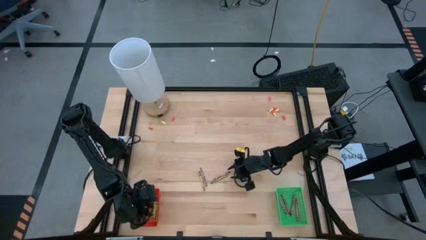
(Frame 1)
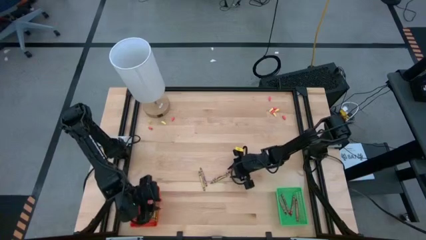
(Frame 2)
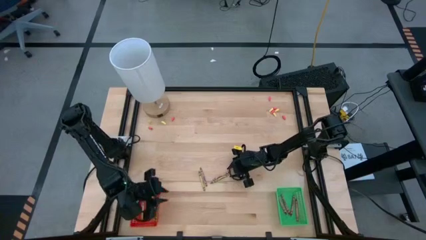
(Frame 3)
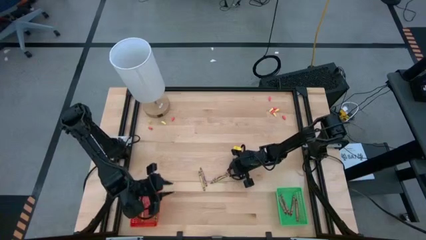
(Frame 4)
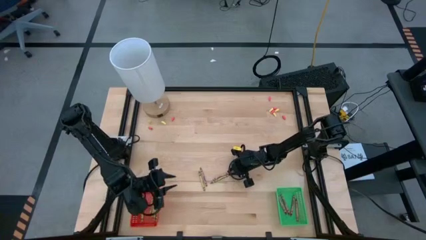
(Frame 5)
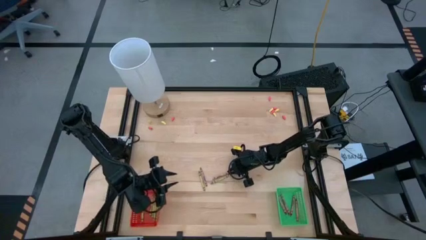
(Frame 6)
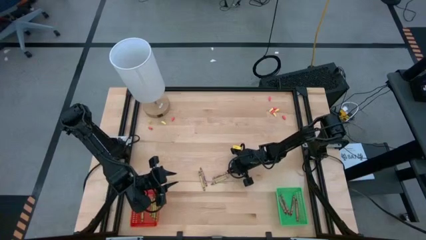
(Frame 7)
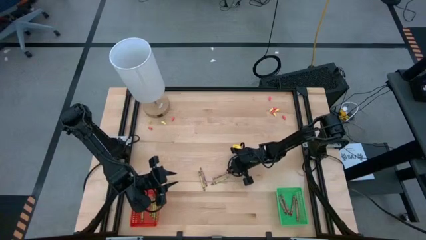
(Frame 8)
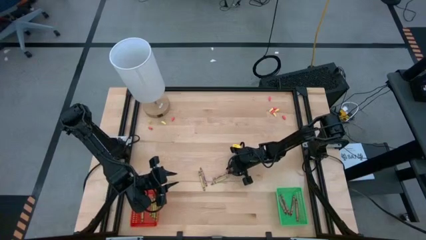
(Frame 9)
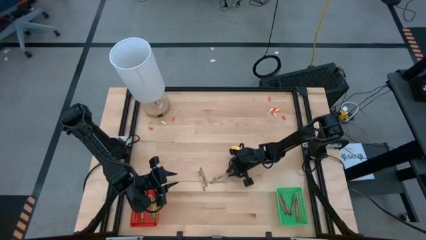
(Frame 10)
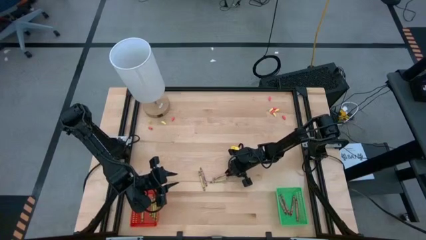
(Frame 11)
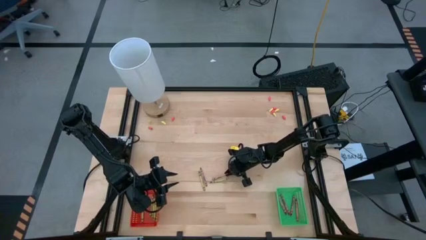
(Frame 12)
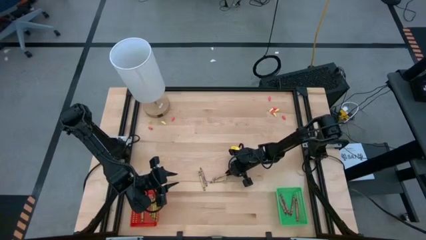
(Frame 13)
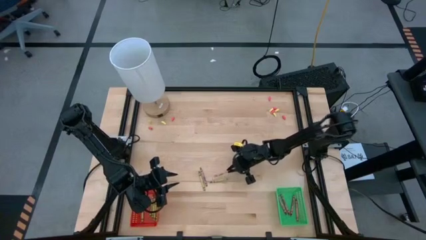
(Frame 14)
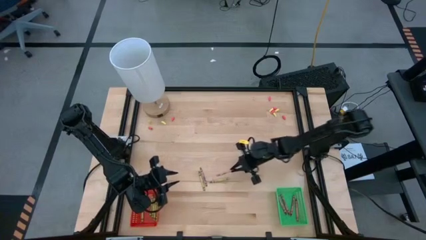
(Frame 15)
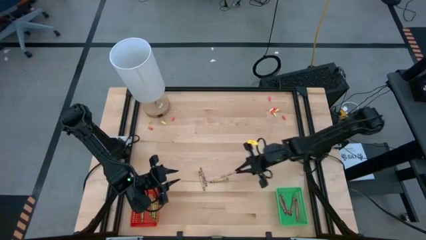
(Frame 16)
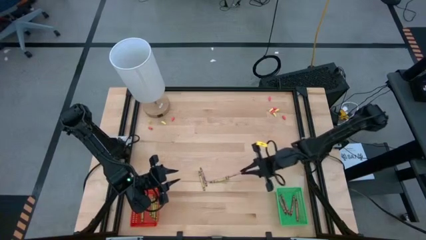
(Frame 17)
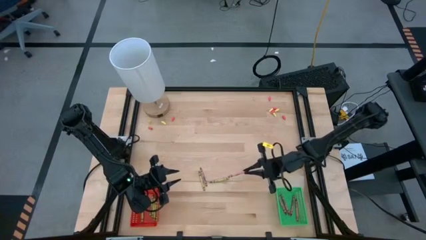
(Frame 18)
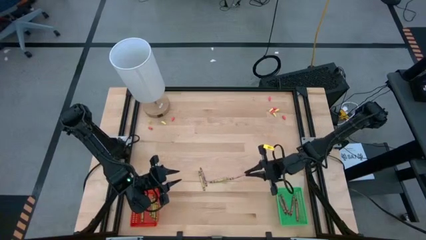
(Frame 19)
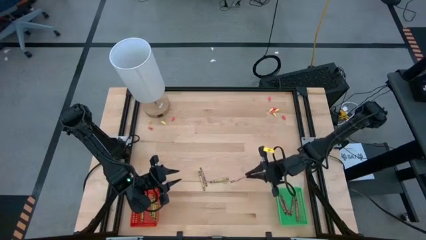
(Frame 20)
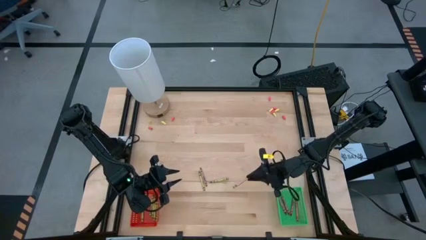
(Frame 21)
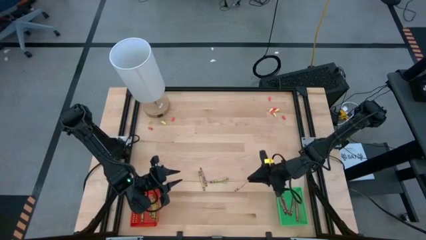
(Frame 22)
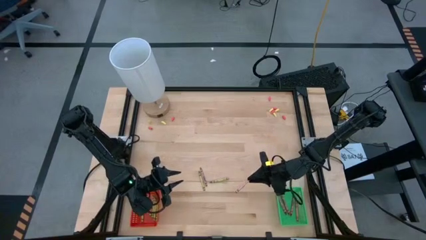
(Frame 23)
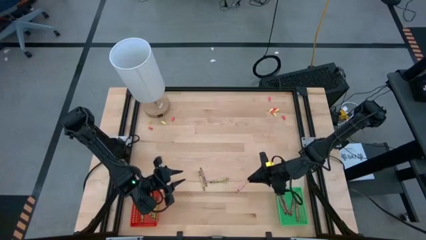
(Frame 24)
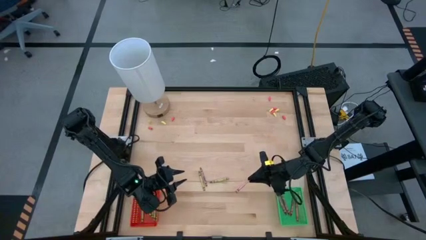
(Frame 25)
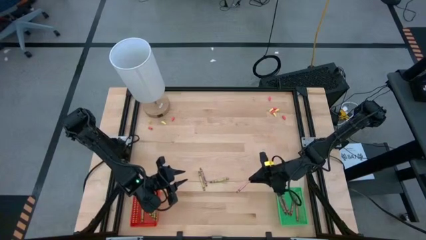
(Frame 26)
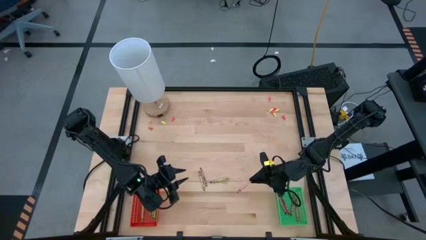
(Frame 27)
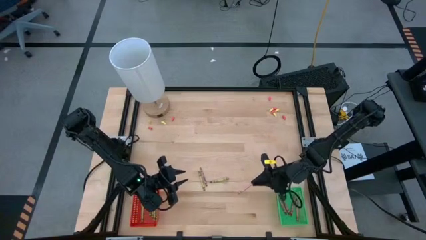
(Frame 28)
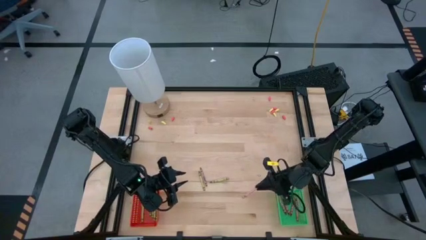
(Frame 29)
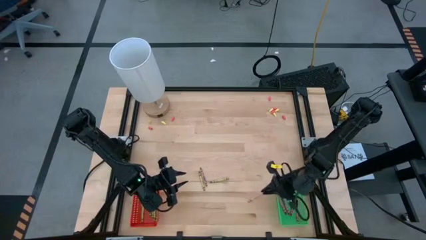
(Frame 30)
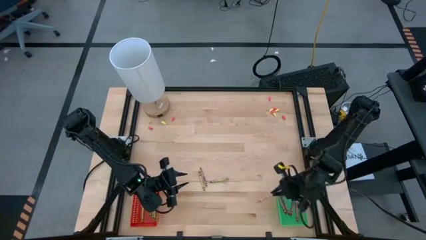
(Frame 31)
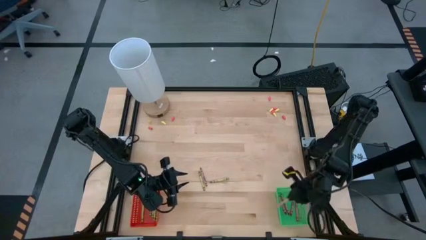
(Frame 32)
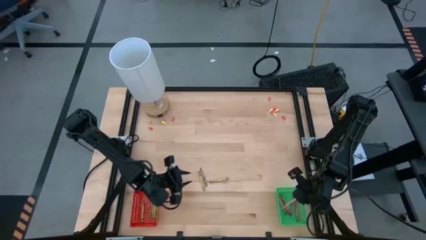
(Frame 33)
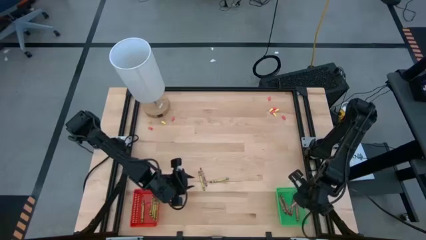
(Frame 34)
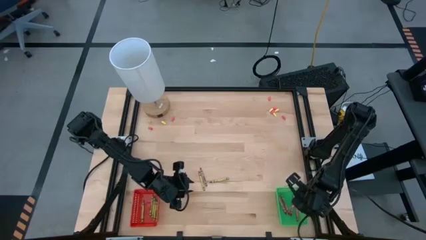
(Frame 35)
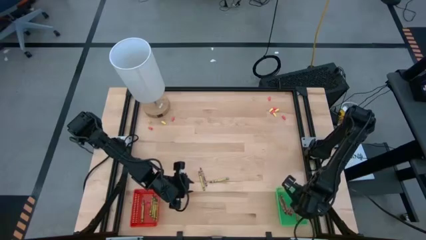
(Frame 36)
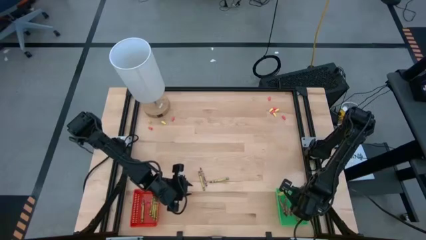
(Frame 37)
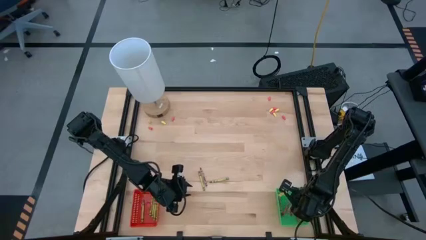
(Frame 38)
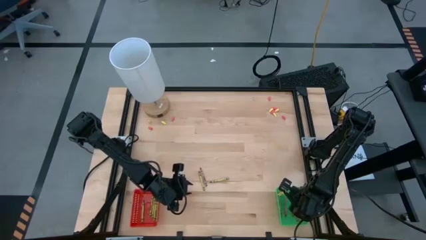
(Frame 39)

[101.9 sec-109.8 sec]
Task: Sort crayons
Put the red crayon into the green bin

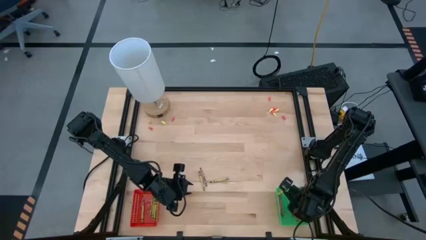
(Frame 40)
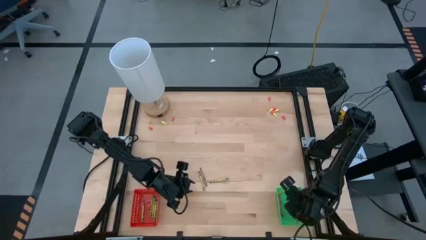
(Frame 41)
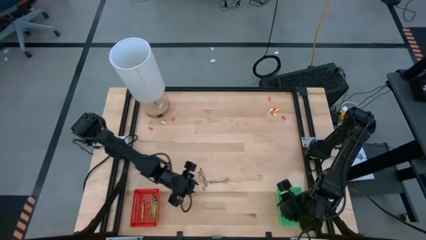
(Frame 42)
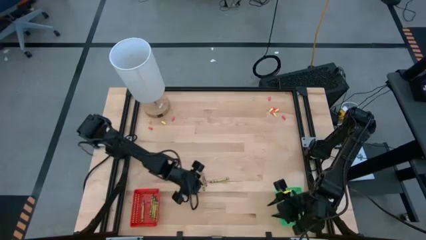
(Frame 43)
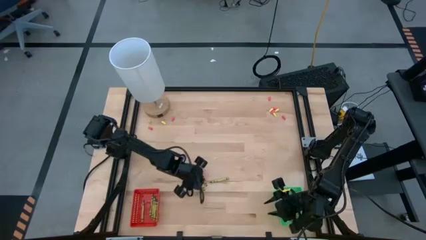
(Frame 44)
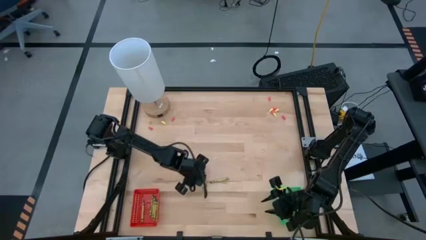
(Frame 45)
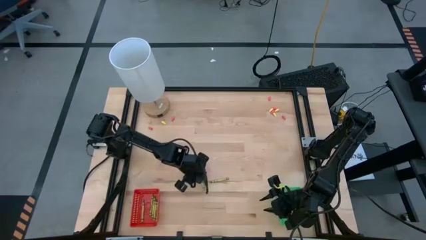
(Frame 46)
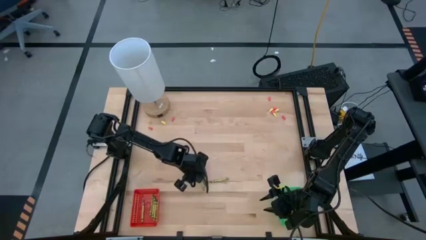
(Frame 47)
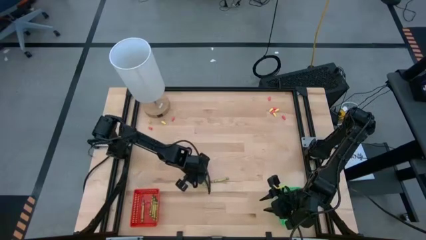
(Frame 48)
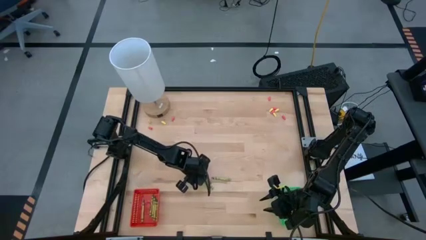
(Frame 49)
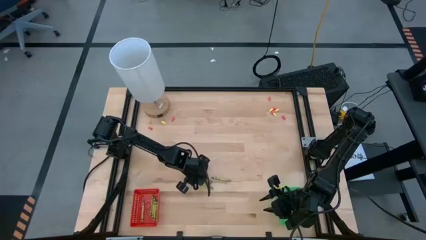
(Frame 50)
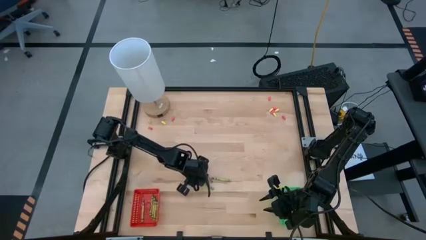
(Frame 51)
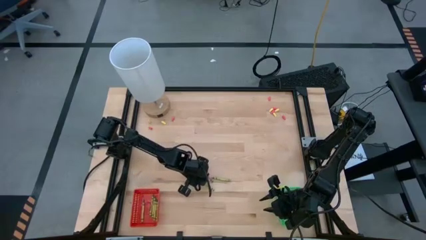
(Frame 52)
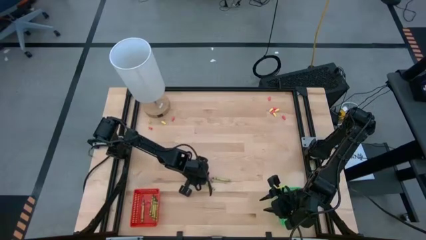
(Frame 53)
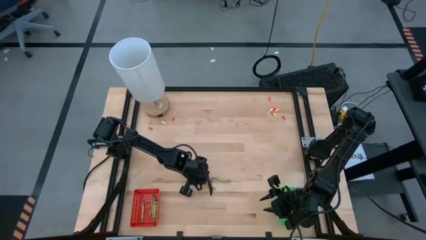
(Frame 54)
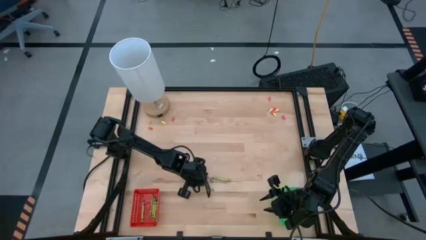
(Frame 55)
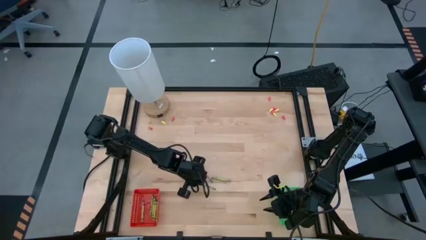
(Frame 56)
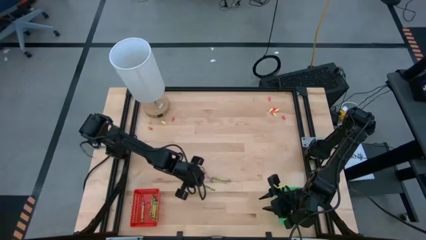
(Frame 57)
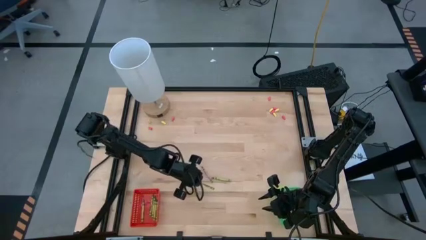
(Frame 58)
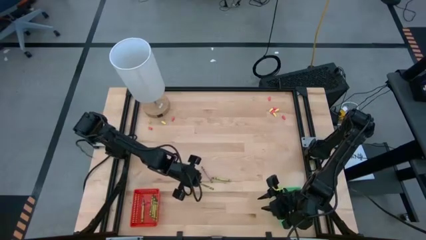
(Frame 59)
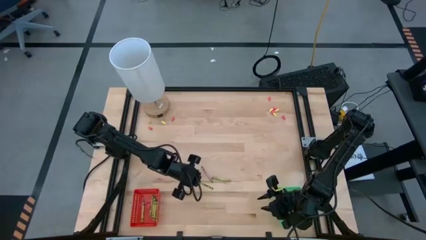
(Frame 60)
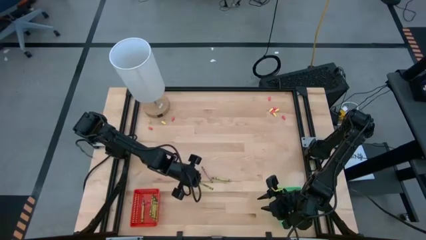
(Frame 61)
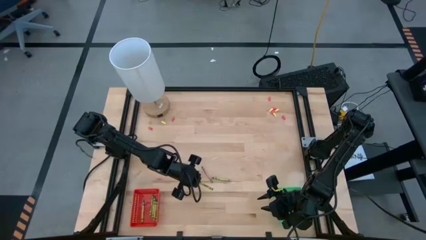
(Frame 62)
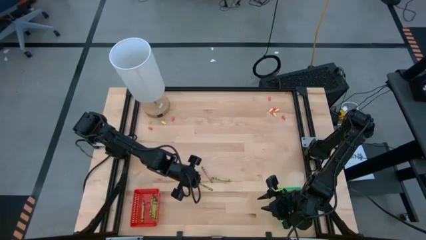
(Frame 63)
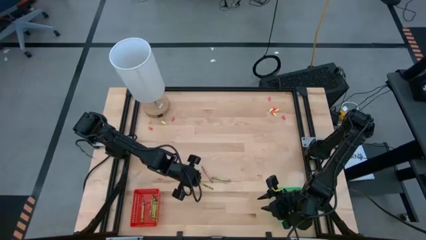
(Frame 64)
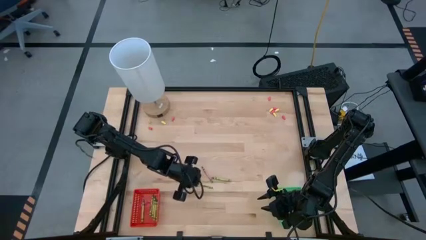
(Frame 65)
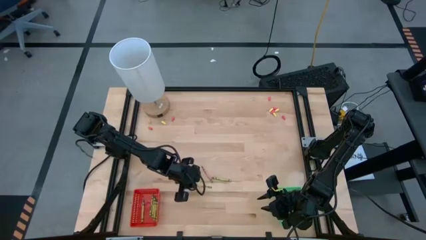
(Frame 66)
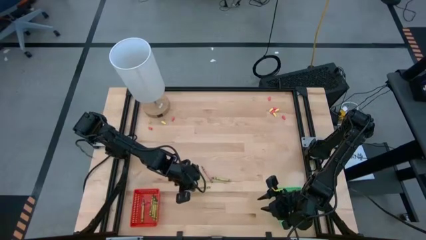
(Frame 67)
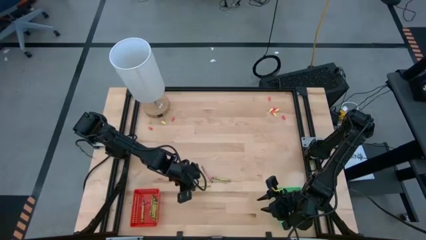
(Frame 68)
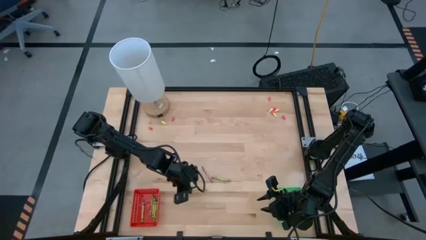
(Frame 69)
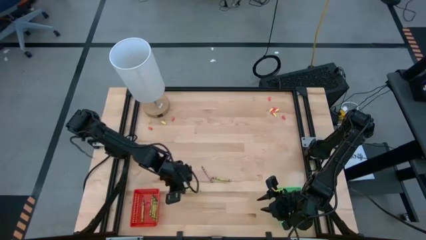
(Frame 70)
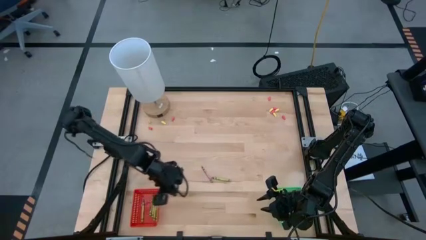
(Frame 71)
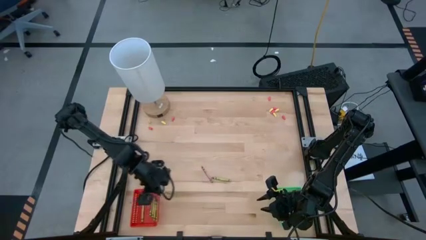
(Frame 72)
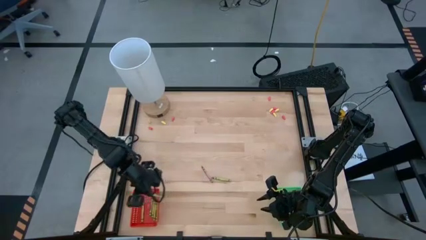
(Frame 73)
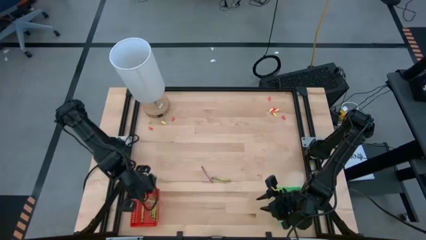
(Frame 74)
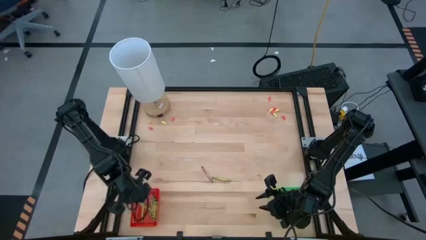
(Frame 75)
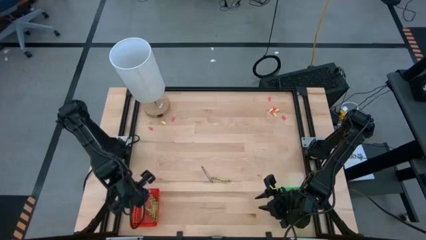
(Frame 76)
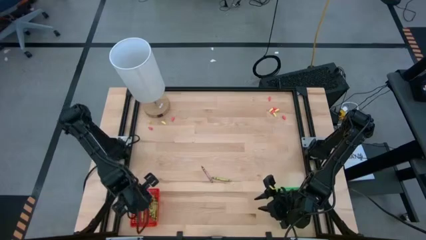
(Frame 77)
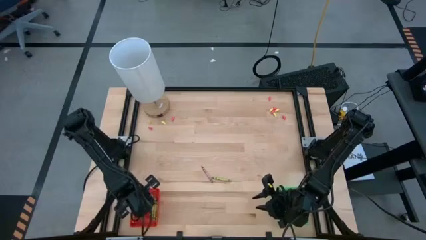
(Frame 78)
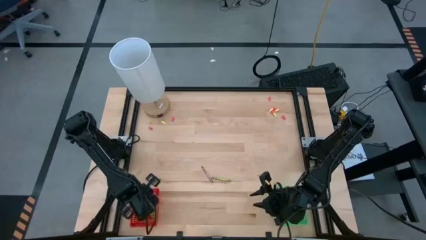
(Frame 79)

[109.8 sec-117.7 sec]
Put the green crayon into the red bin
